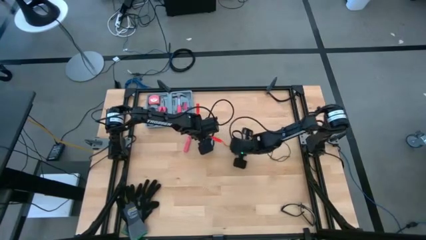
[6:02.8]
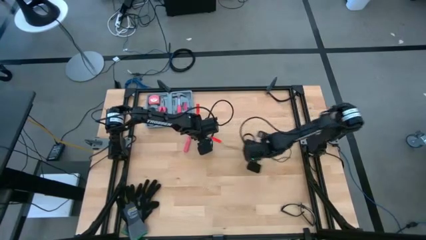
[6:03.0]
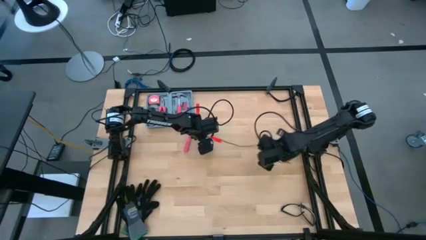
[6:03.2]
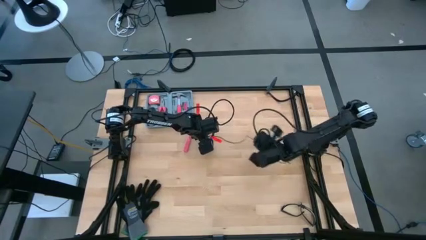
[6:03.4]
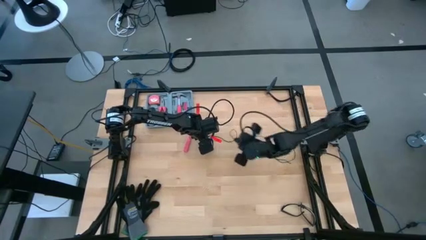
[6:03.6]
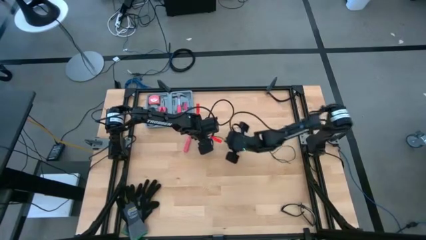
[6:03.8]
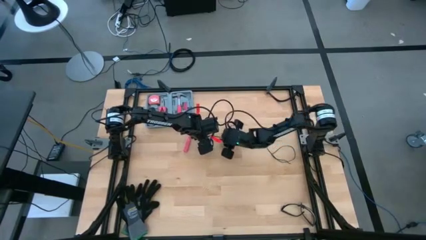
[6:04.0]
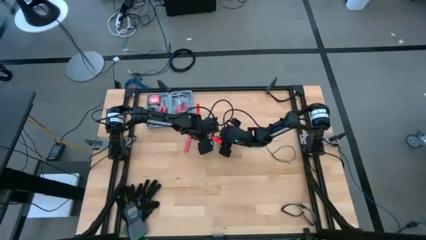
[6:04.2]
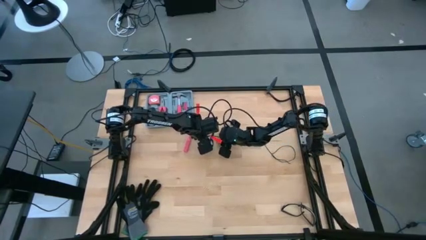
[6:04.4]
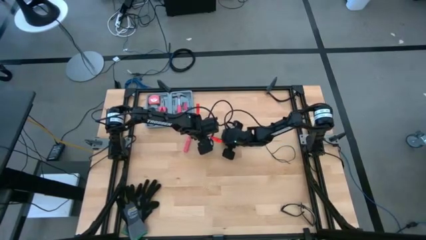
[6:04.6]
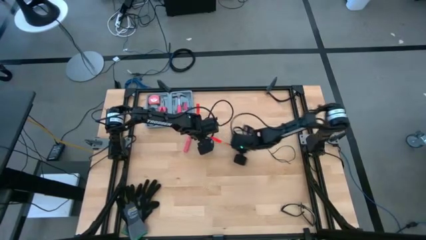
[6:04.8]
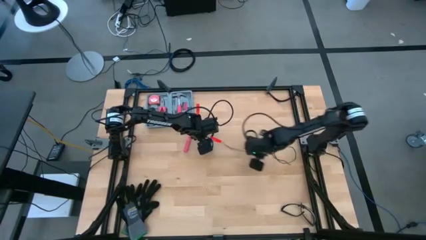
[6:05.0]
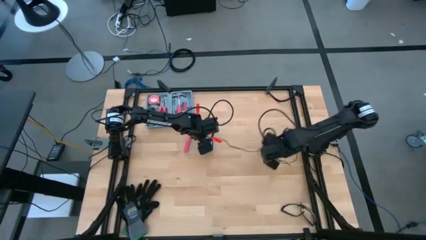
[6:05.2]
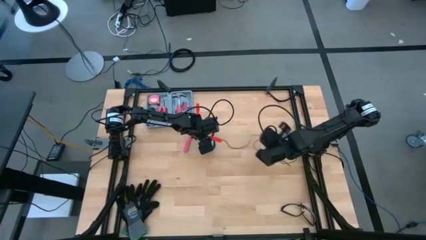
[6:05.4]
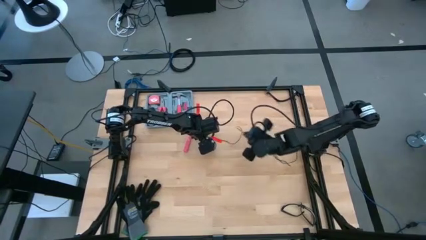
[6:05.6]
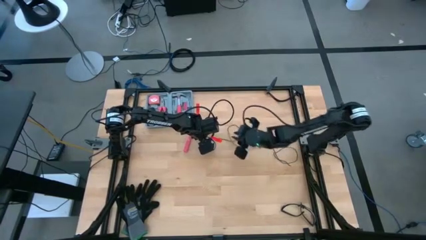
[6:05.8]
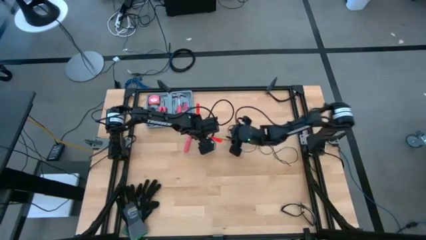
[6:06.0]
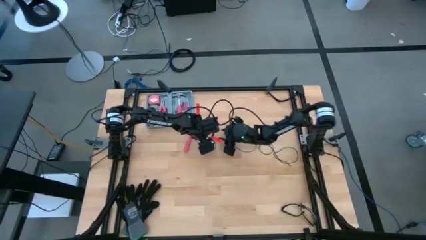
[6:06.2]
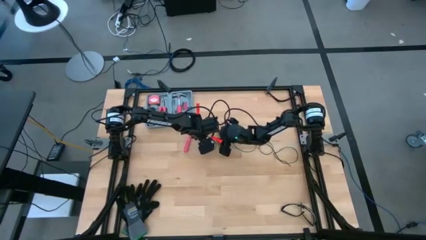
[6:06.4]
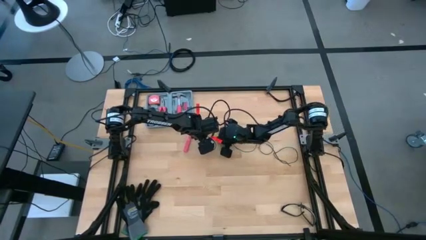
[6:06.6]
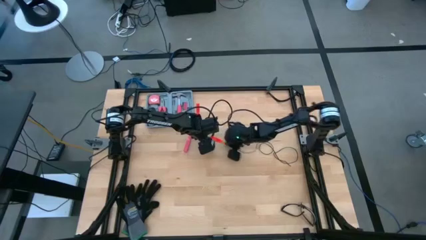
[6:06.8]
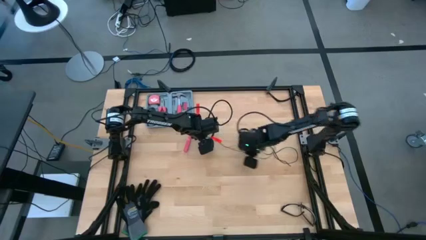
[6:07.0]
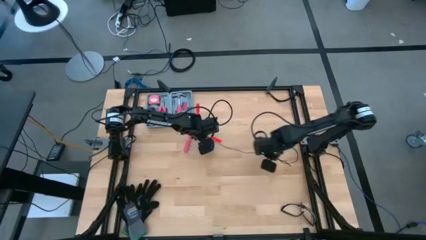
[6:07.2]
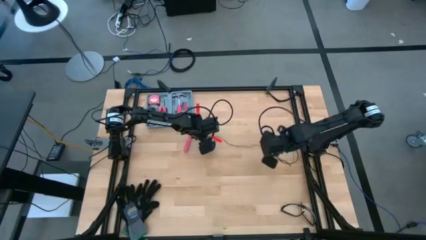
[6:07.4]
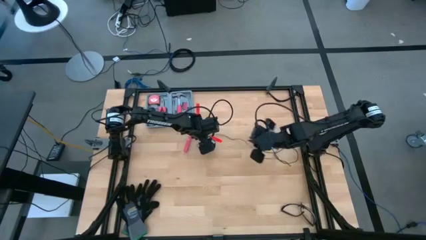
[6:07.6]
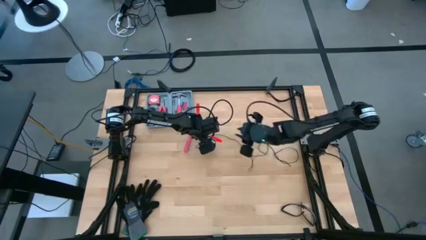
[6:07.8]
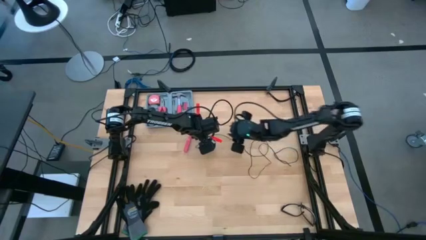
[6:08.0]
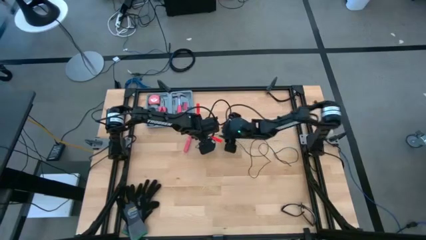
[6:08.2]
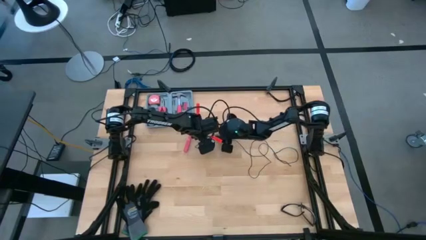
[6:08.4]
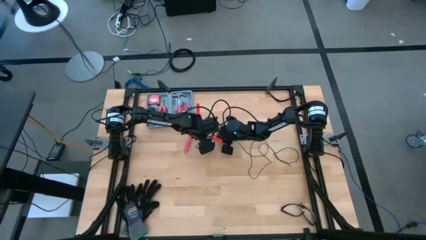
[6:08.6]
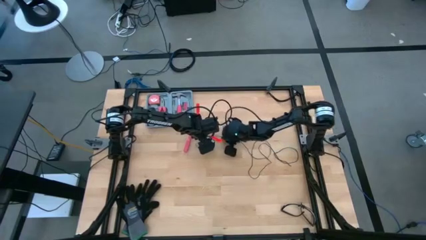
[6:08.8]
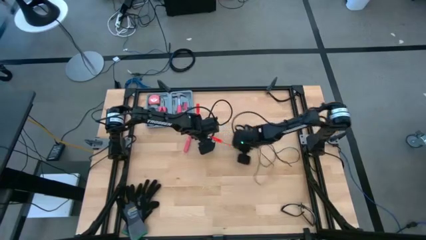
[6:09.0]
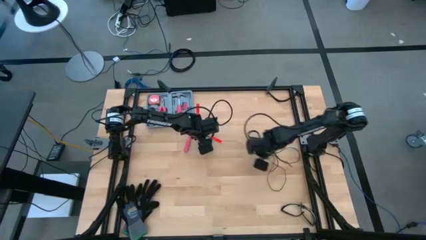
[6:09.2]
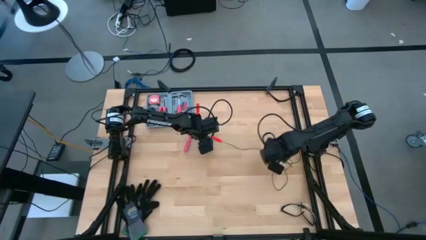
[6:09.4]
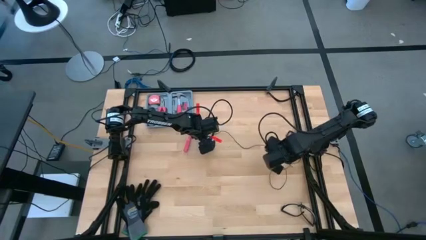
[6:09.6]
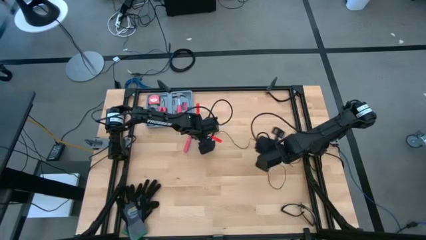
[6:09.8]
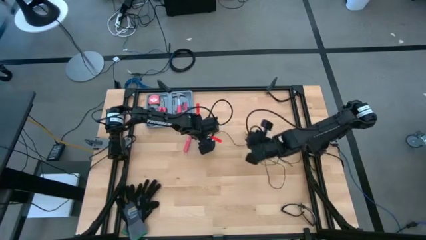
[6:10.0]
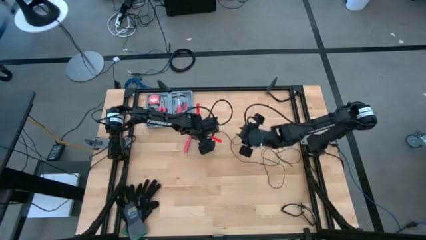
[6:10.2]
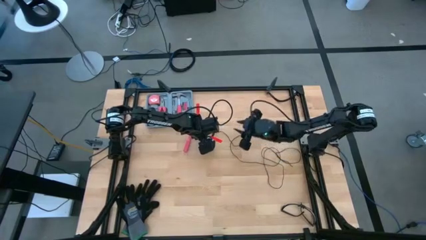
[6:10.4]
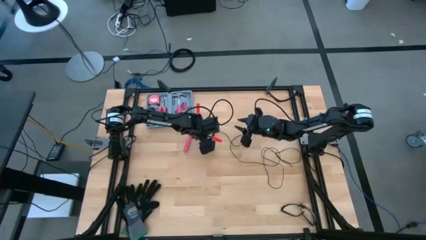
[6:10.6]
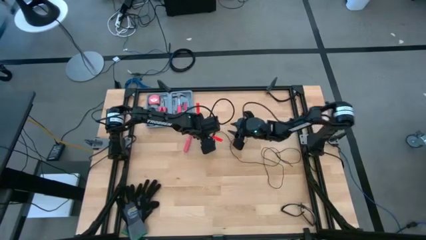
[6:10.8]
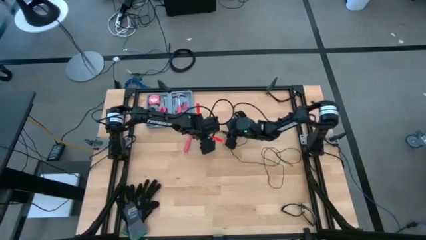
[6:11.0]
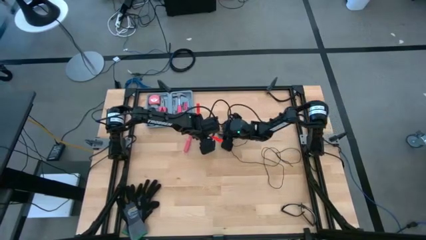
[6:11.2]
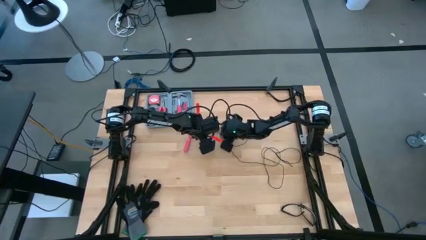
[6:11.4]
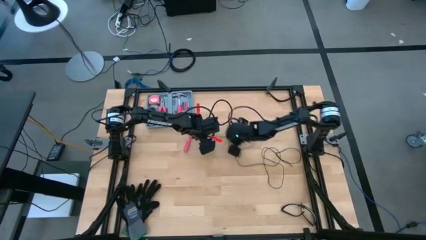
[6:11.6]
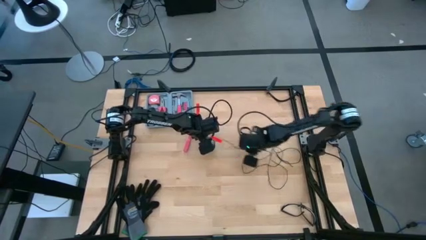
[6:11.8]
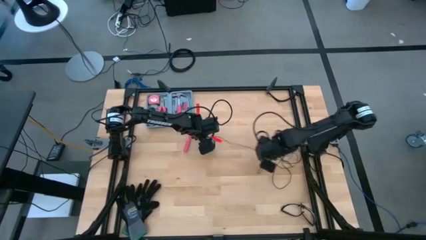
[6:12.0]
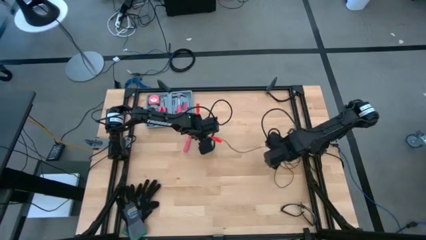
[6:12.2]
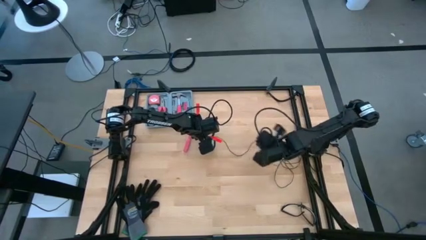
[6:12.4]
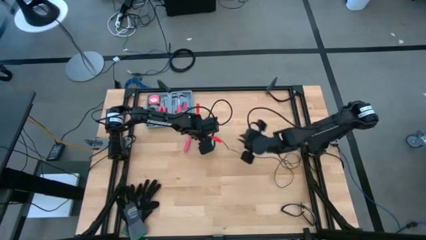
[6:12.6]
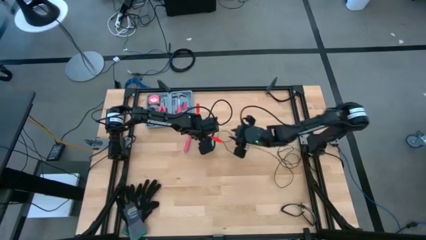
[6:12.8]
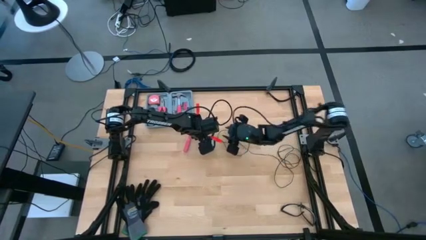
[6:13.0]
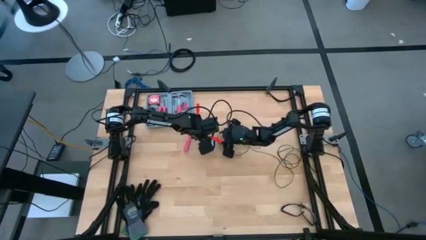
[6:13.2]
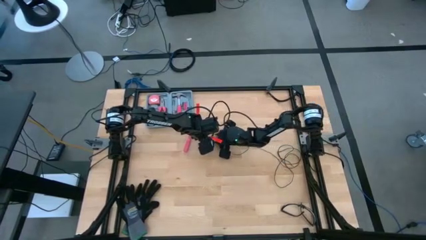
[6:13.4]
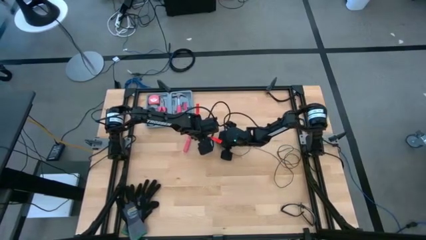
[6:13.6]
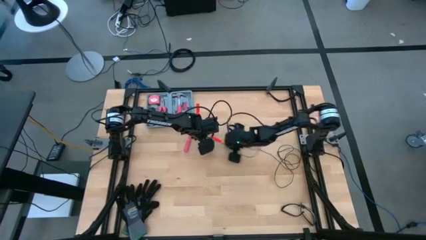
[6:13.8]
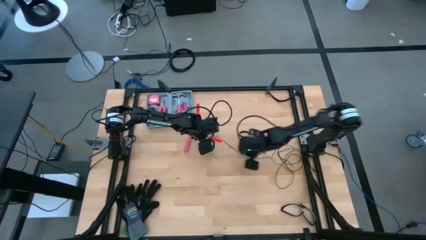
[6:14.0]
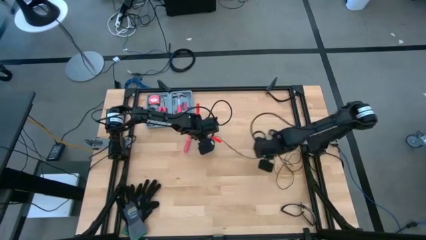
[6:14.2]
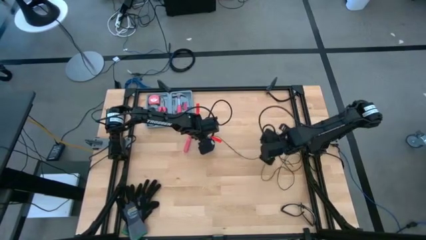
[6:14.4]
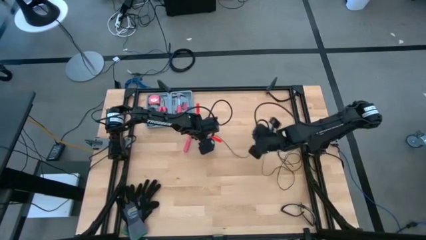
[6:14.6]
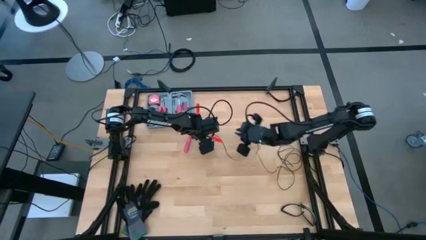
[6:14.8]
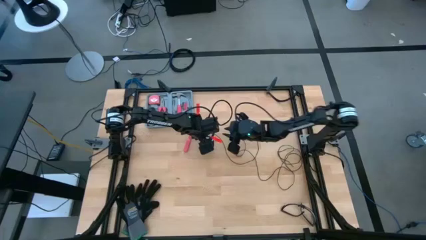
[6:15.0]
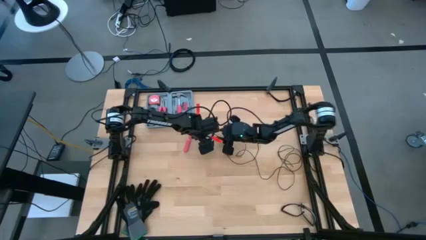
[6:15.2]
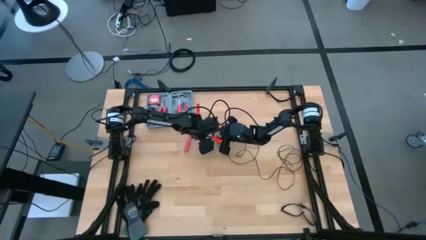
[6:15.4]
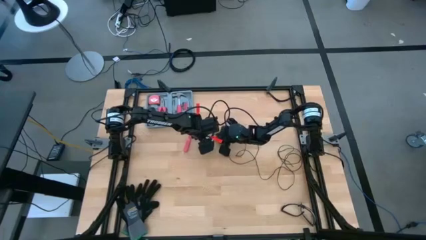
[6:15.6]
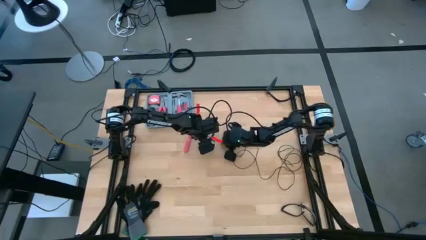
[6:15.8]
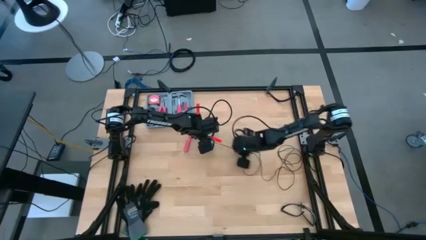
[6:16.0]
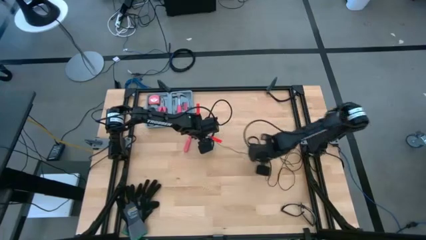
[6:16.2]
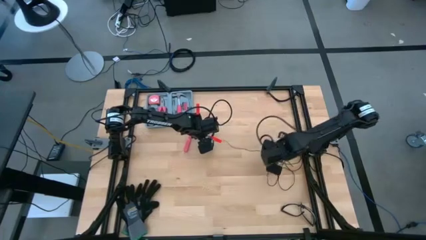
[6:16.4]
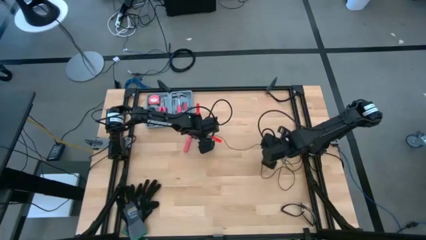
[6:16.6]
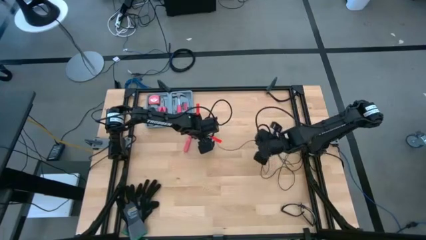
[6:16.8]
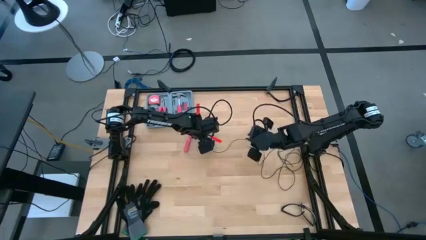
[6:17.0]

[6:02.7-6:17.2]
Task: Coil cords
Uncoil the black wire from the spool

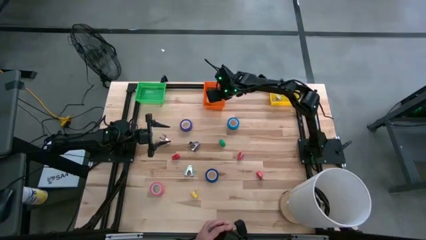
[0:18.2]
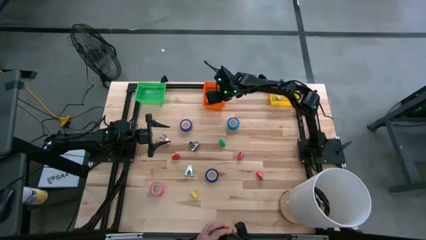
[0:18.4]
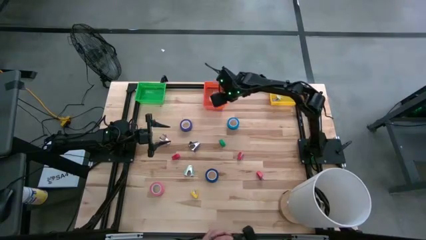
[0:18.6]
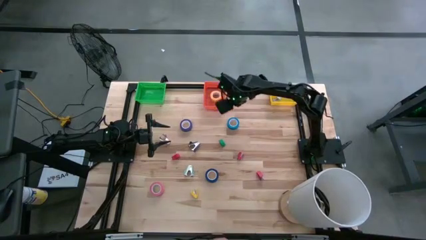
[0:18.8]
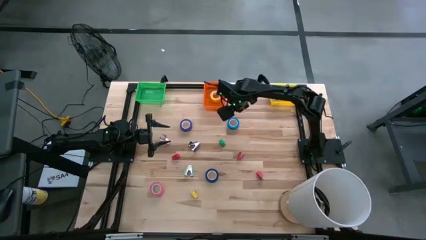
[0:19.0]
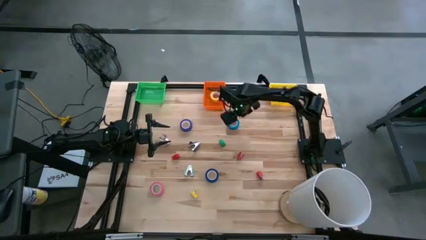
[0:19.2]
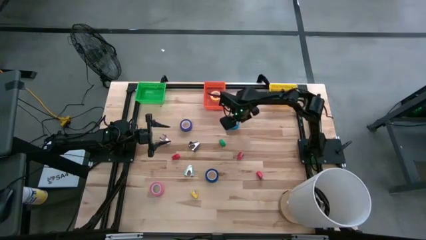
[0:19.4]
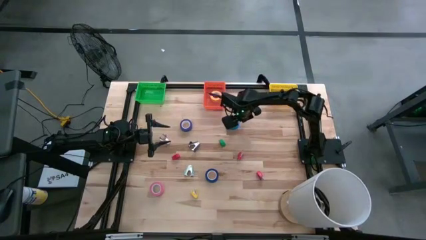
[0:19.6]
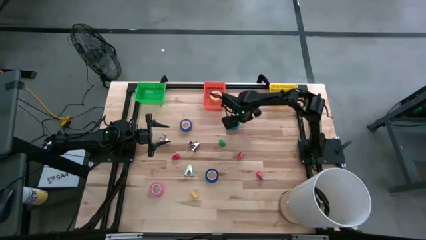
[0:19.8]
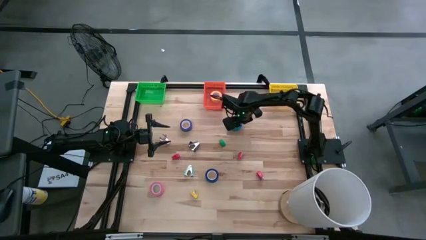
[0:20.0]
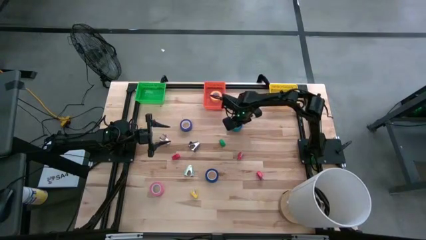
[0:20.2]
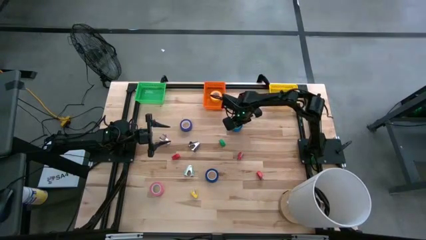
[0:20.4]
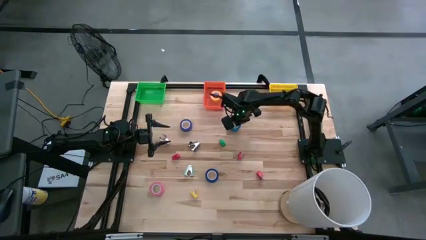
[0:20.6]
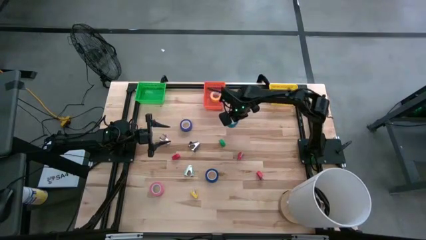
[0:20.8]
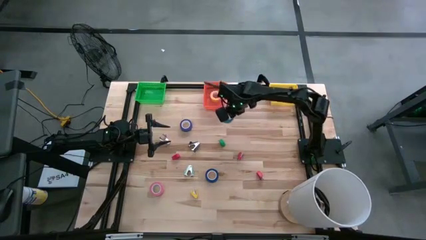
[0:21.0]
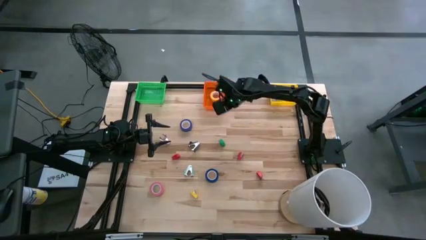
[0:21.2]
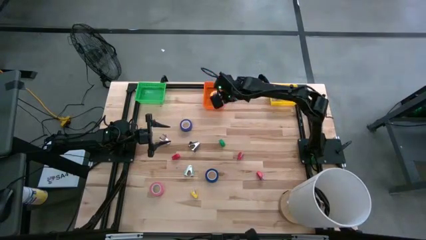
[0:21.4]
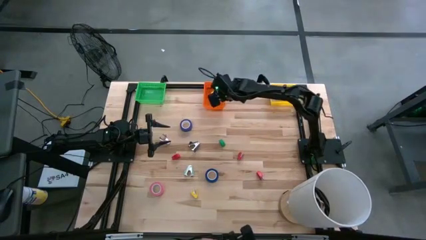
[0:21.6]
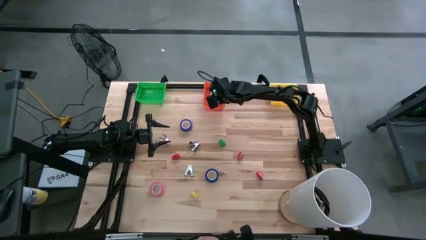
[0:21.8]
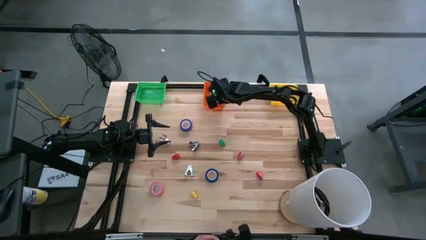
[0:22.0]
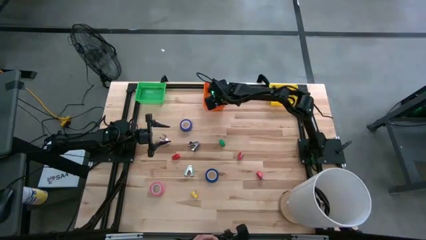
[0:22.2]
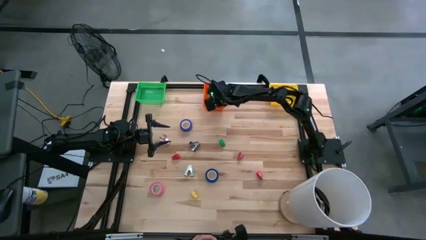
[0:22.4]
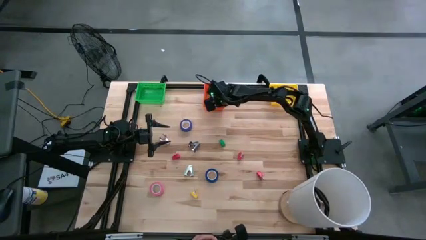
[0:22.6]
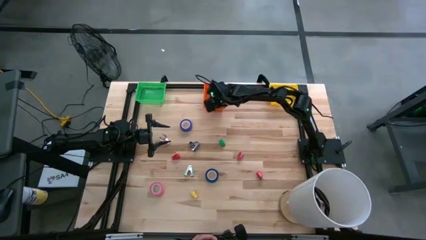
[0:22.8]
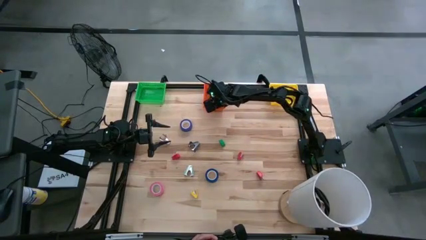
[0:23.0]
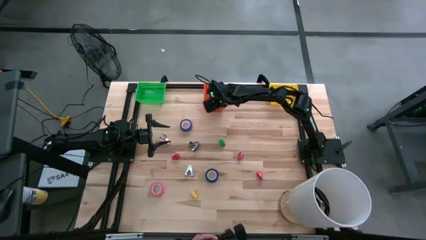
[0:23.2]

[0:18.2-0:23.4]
Task: Pick and place Stapler, Stapler remover, tape
Put the light blue tape into the orange bin
